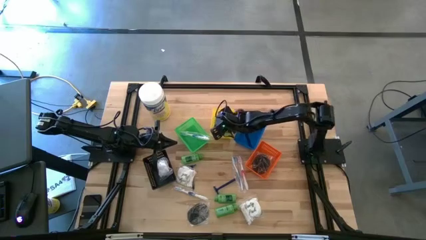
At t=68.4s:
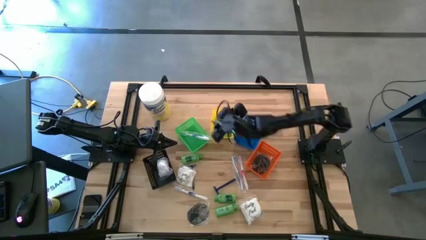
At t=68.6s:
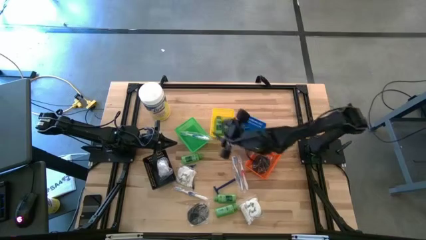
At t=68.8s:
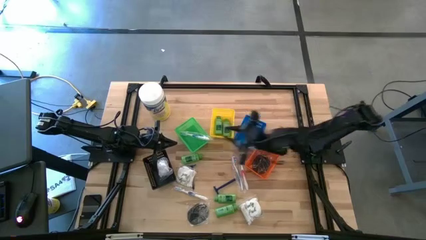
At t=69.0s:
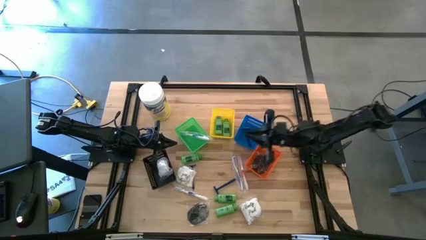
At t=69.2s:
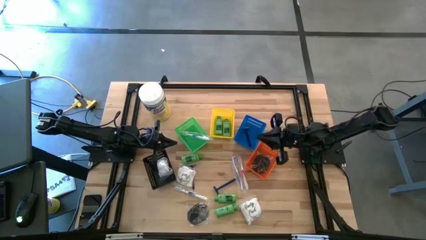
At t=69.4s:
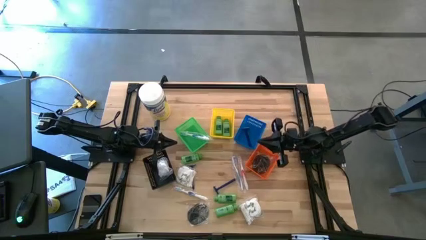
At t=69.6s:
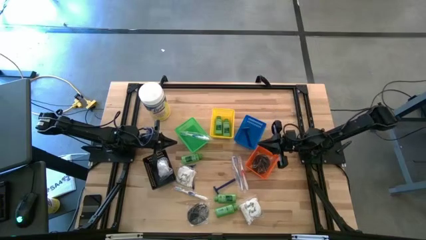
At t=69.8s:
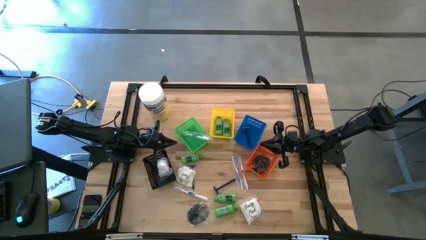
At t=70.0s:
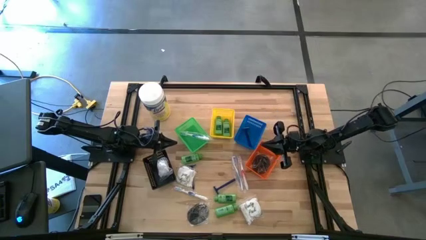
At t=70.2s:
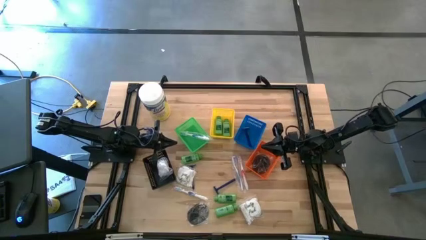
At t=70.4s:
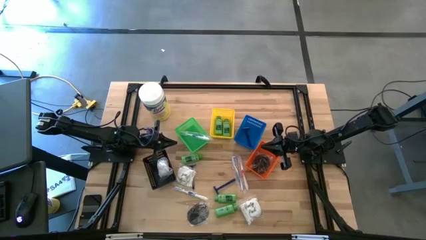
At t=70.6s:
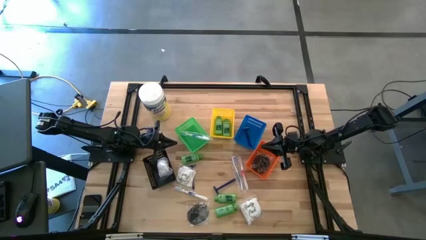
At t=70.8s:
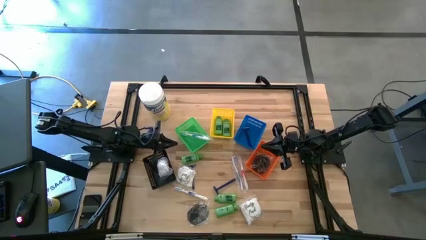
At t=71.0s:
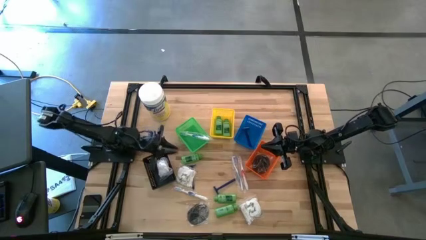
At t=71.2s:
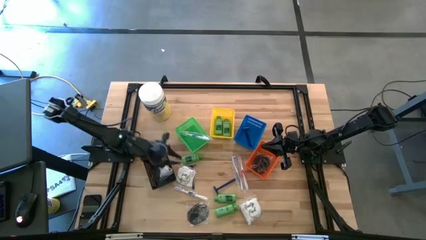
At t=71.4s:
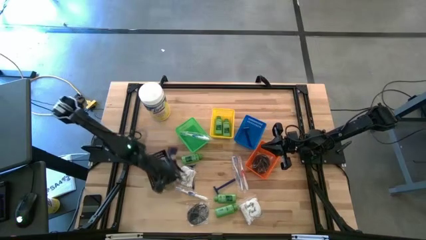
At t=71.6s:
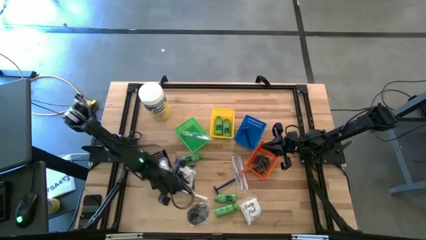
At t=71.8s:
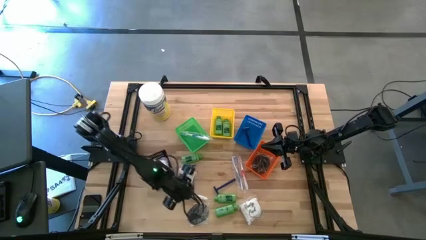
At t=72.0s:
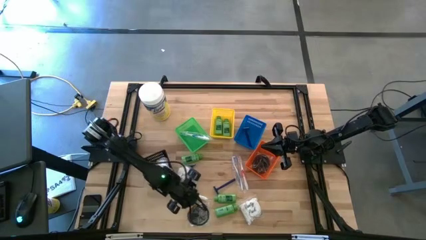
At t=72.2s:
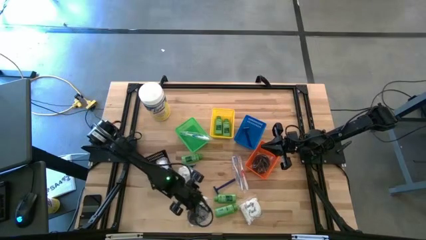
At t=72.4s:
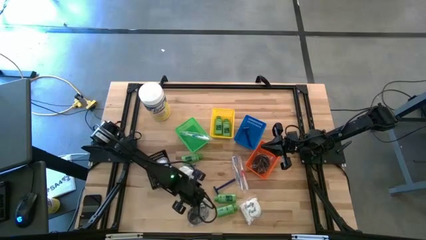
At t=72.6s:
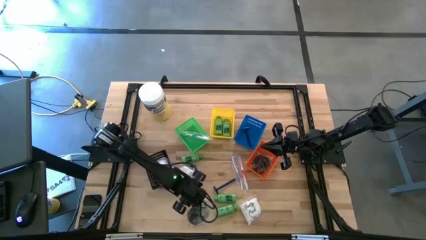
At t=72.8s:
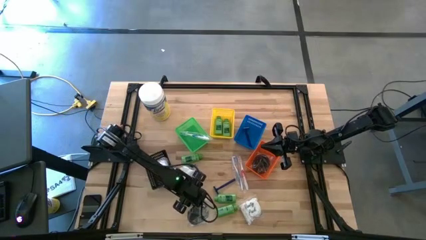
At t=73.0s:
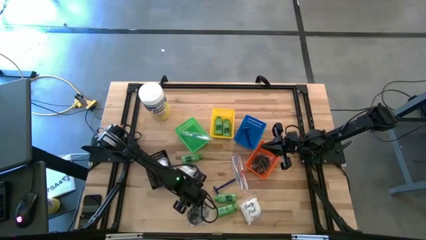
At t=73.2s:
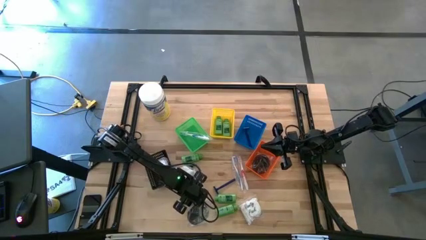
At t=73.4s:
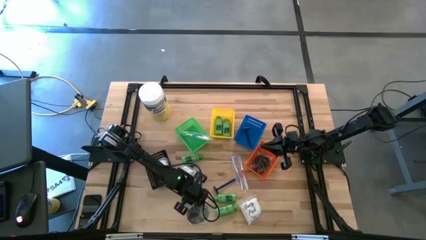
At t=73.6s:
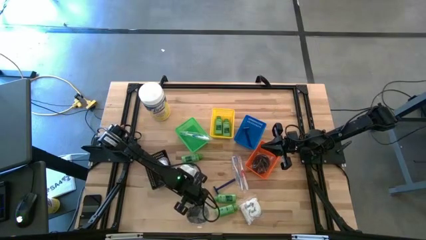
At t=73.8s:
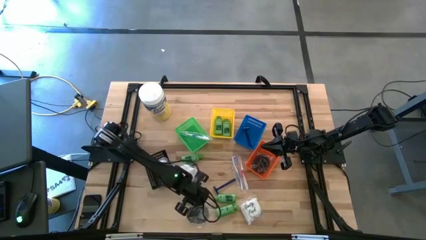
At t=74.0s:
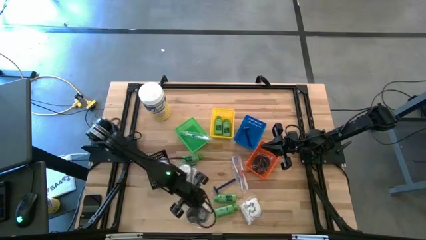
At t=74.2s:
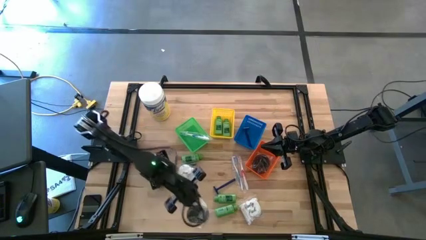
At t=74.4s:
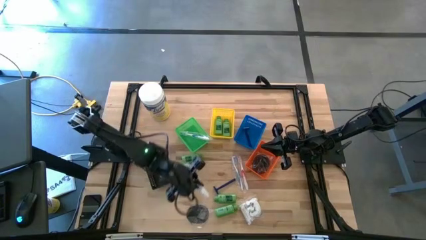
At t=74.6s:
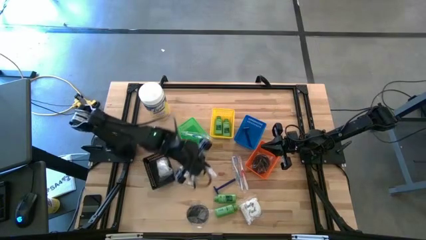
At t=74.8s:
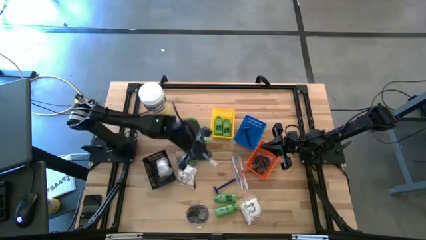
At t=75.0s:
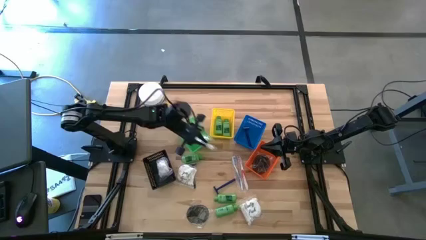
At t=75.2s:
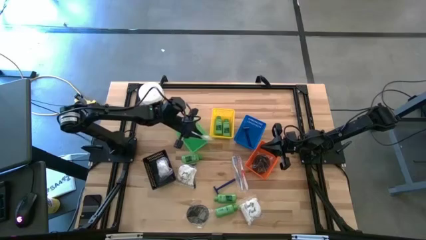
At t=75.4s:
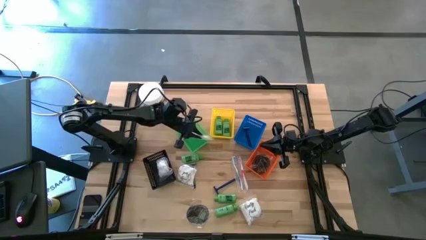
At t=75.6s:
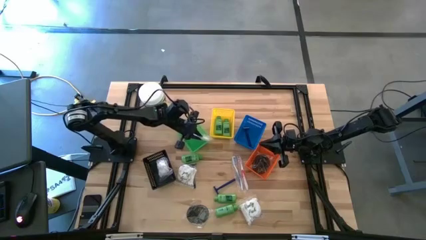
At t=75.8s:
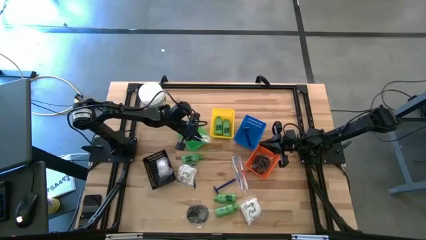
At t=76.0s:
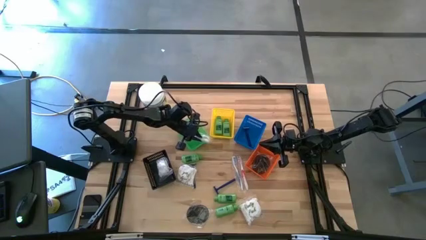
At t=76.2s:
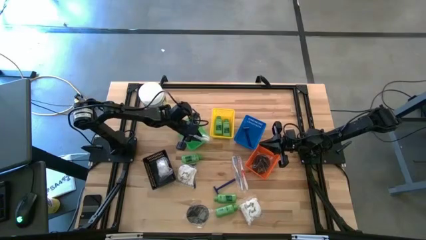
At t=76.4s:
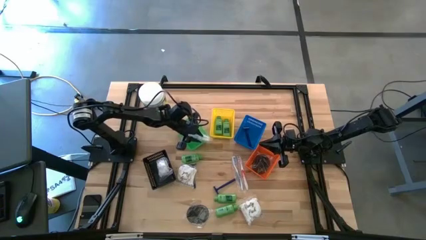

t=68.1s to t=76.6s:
Task: Pick & Place Travel size toiletries
Put the blue toothbrush into the green bin

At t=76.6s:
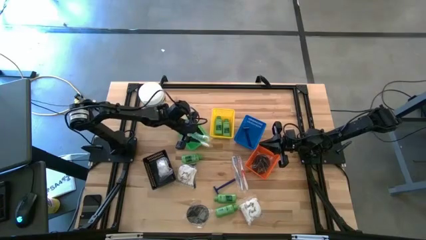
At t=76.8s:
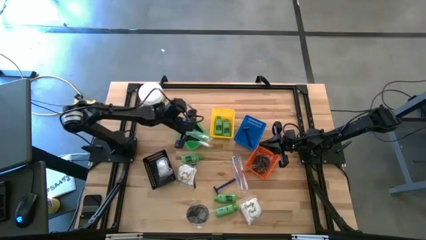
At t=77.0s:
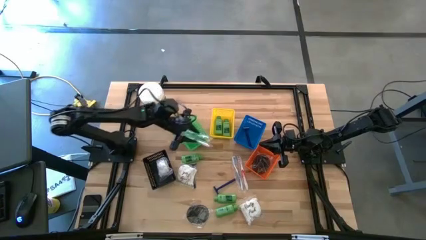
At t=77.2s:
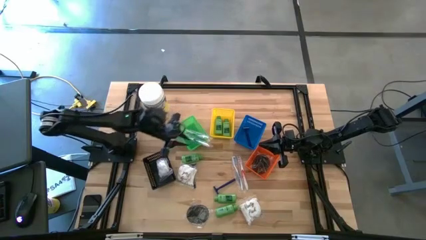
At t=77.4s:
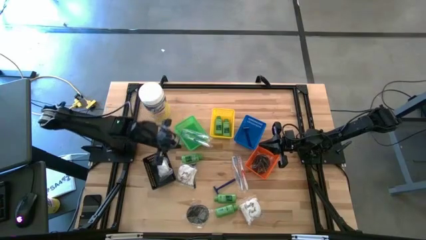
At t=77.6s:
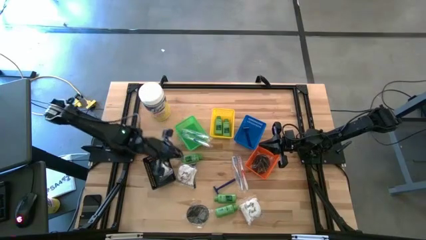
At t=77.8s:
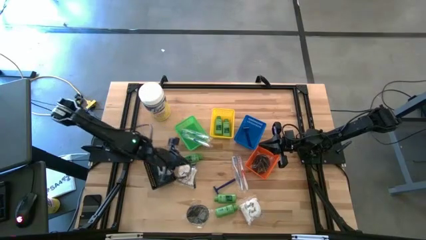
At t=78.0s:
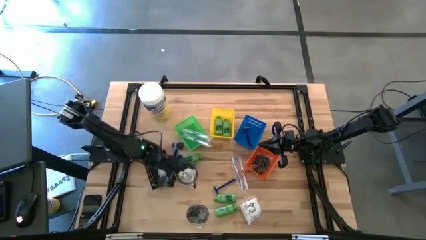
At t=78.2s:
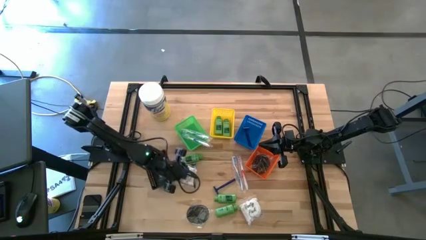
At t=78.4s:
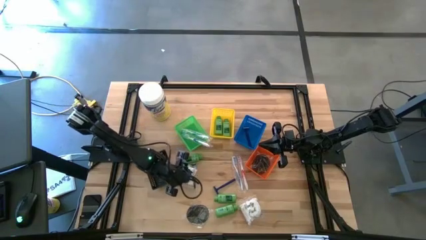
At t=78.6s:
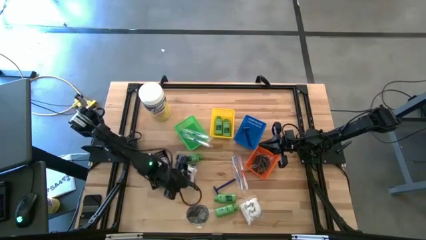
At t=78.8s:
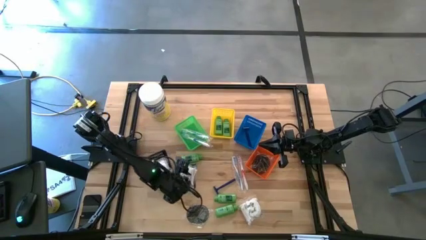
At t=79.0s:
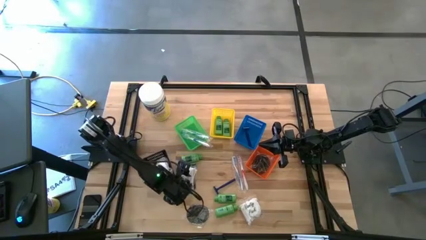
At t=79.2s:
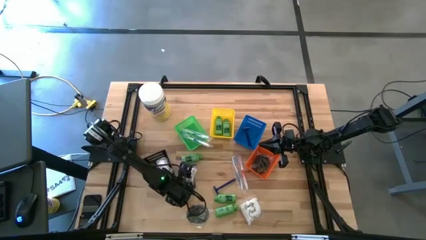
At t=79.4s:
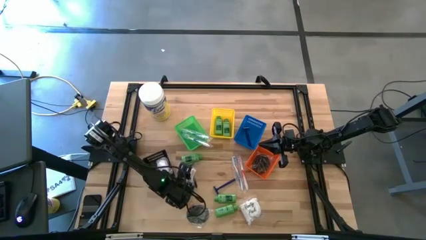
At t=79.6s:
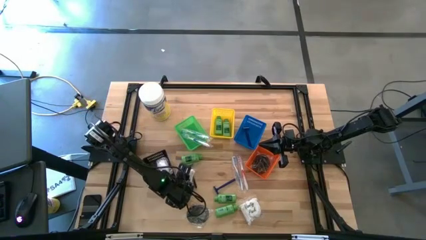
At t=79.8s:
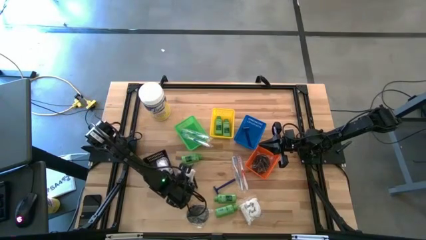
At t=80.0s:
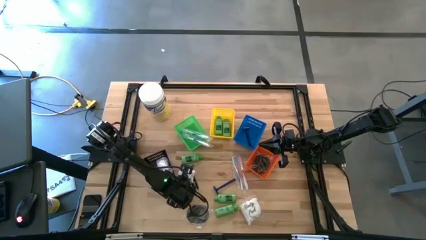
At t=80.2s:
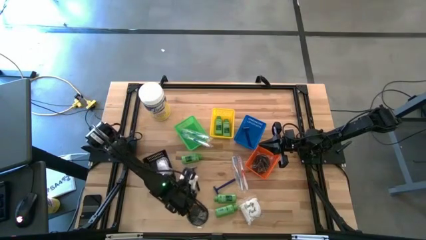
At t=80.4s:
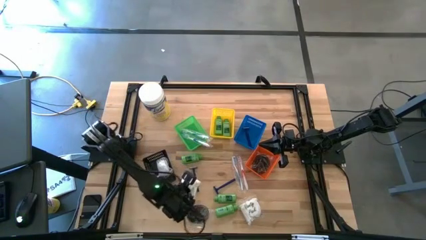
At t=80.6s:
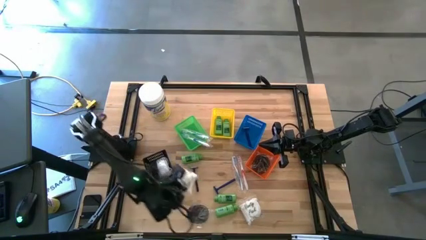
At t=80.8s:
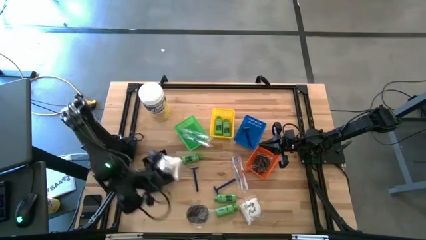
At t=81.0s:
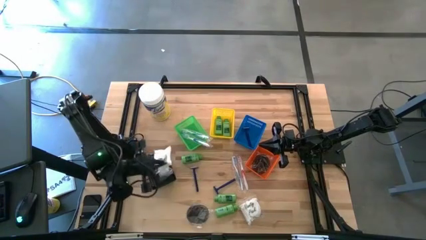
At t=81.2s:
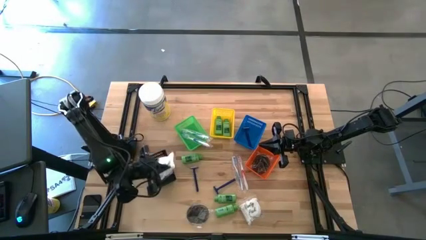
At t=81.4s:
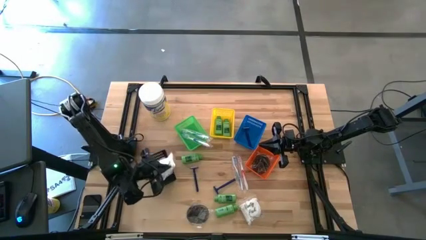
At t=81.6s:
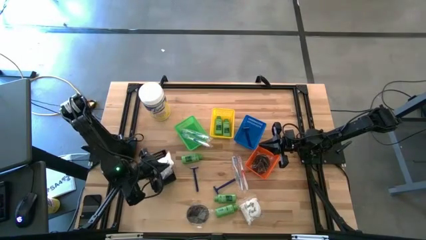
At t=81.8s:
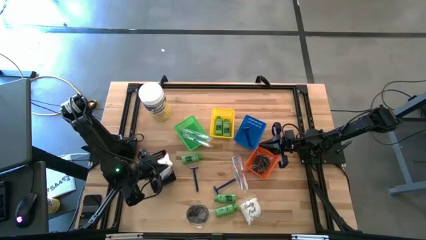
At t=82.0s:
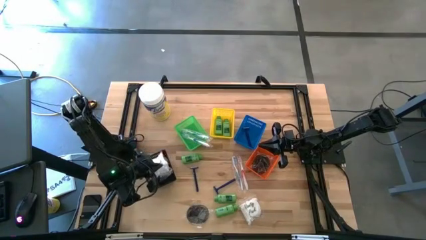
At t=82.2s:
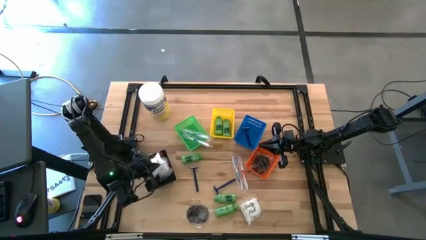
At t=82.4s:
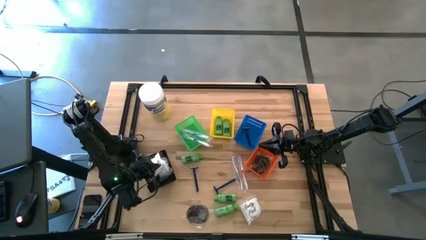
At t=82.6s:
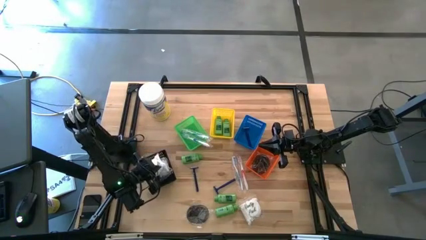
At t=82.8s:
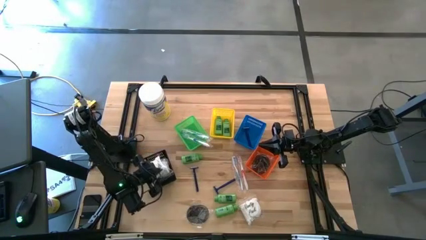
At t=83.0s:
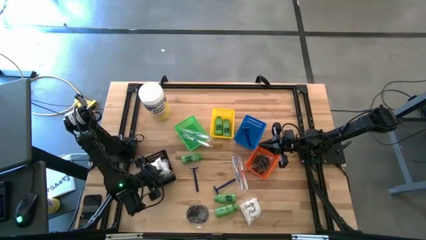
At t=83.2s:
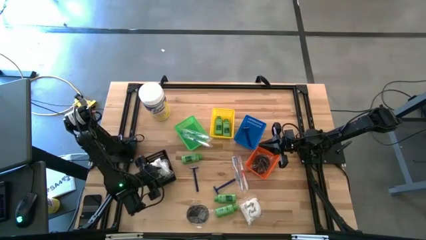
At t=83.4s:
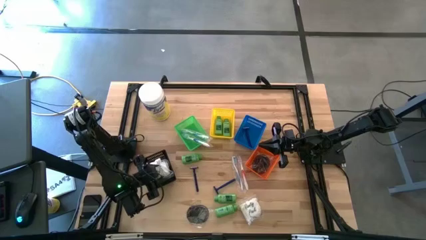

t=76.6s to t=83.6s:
Put the cotton pack into the black bin
